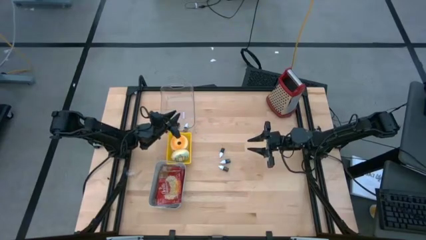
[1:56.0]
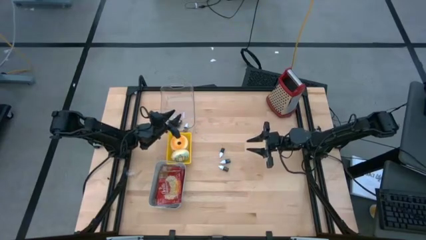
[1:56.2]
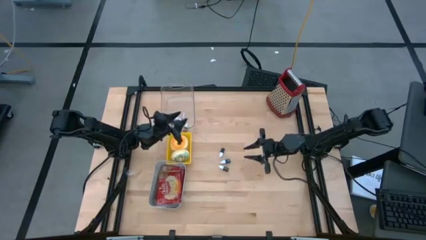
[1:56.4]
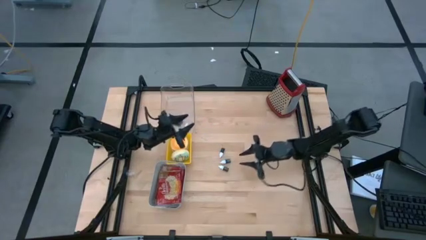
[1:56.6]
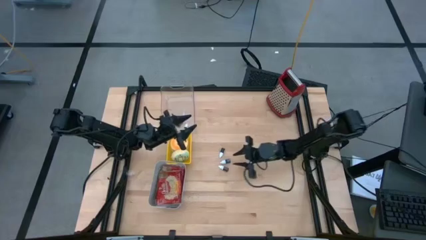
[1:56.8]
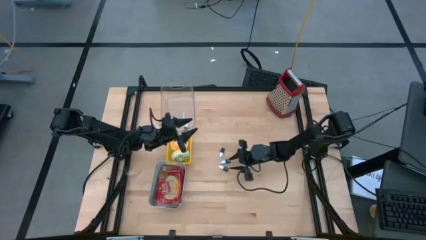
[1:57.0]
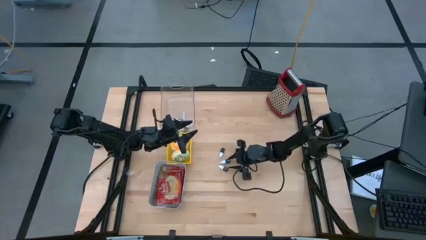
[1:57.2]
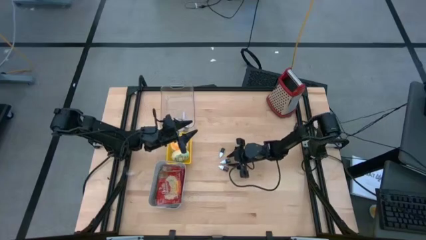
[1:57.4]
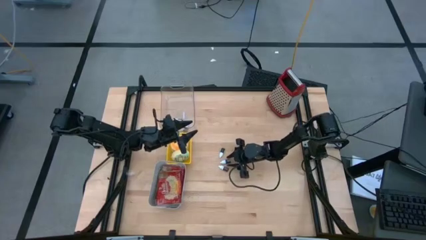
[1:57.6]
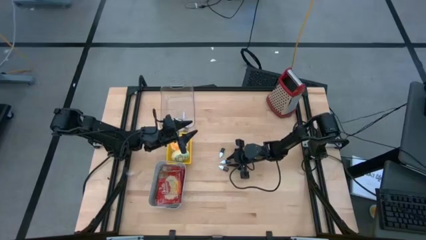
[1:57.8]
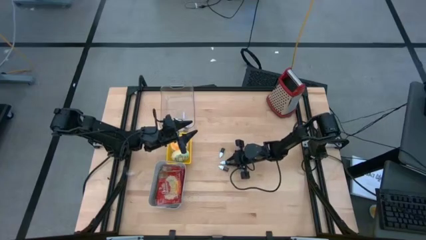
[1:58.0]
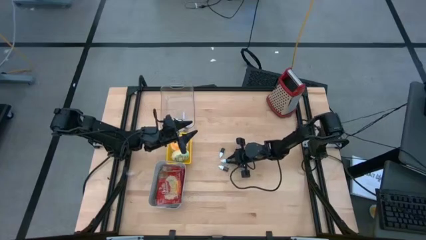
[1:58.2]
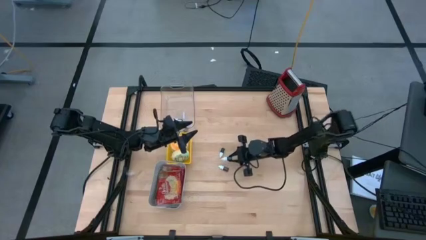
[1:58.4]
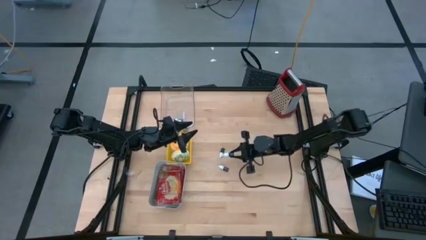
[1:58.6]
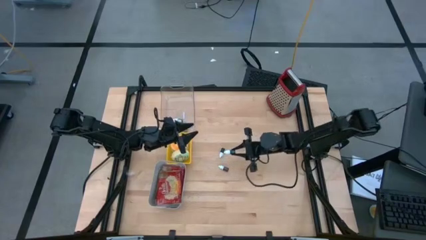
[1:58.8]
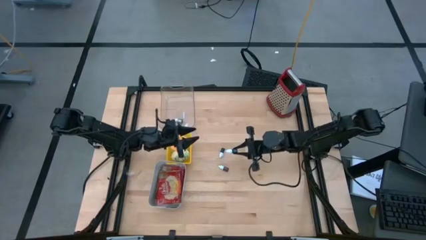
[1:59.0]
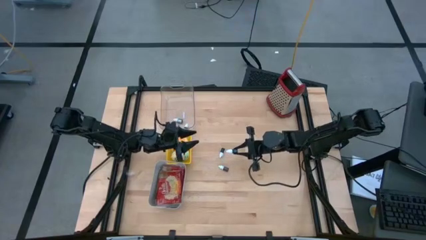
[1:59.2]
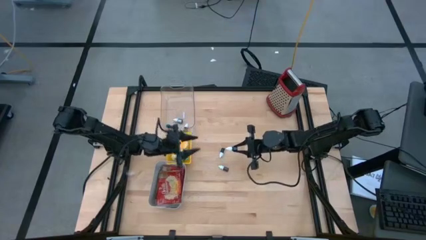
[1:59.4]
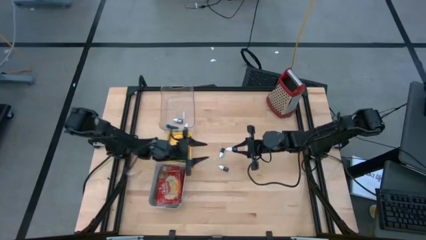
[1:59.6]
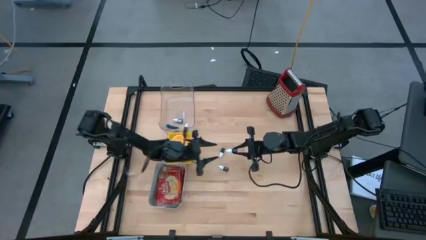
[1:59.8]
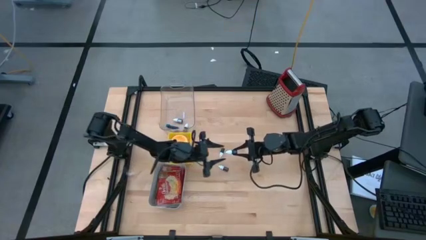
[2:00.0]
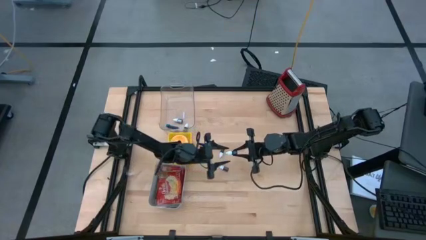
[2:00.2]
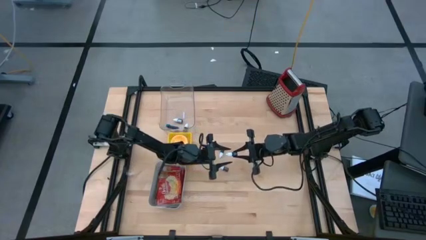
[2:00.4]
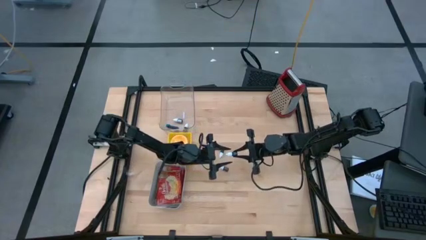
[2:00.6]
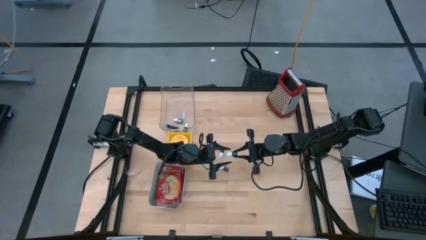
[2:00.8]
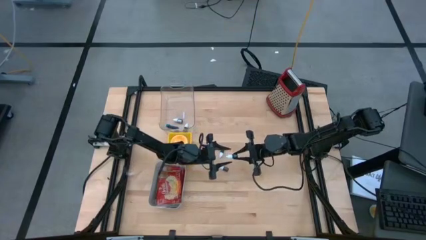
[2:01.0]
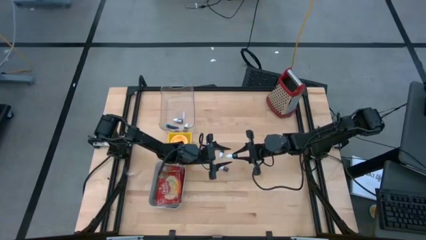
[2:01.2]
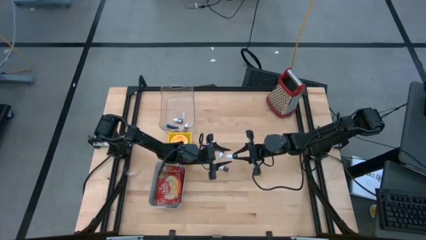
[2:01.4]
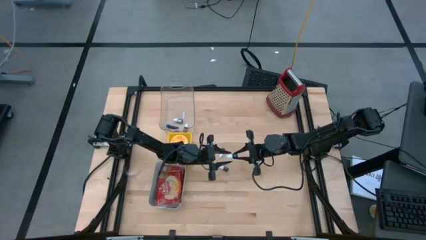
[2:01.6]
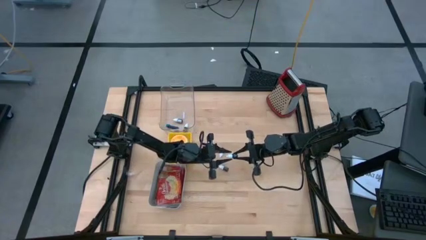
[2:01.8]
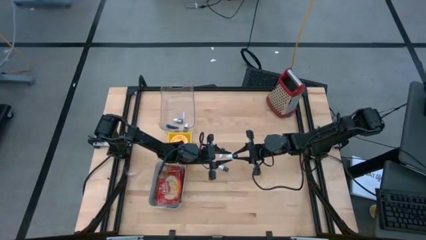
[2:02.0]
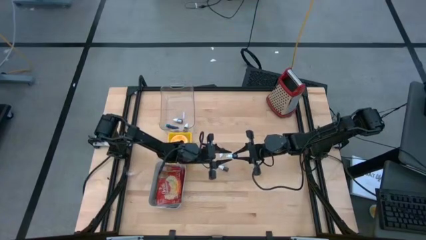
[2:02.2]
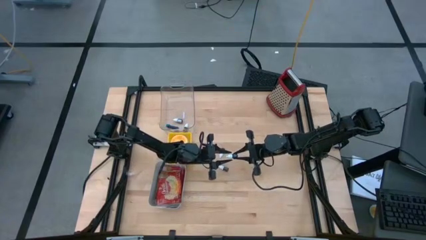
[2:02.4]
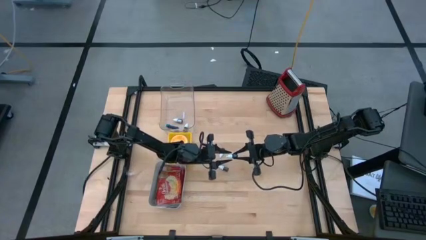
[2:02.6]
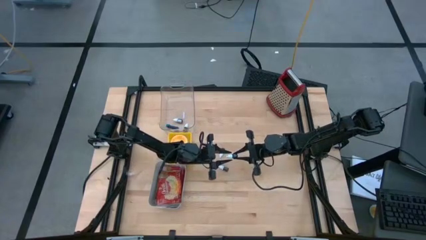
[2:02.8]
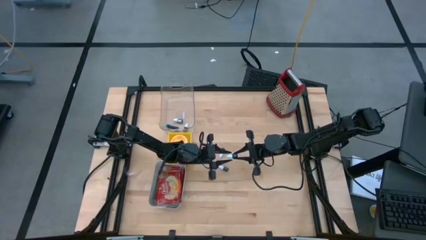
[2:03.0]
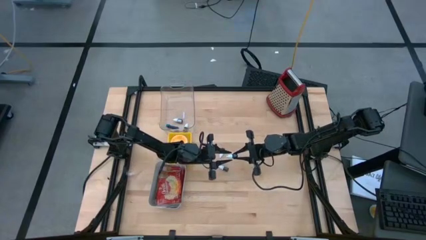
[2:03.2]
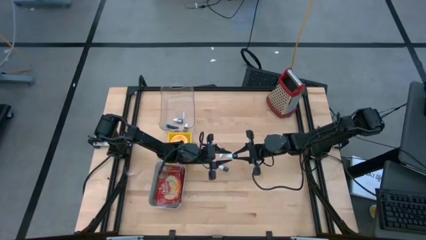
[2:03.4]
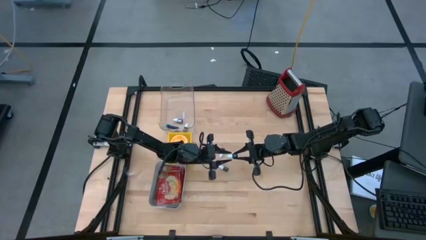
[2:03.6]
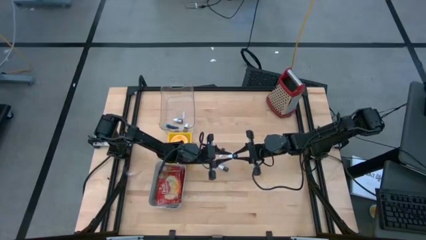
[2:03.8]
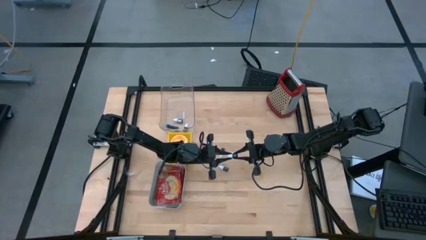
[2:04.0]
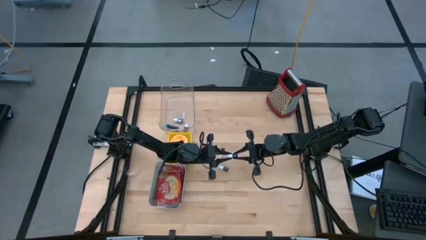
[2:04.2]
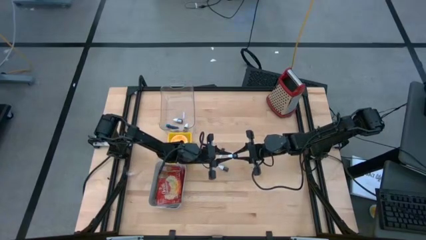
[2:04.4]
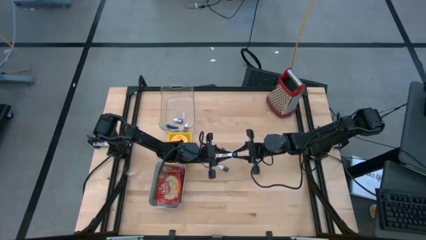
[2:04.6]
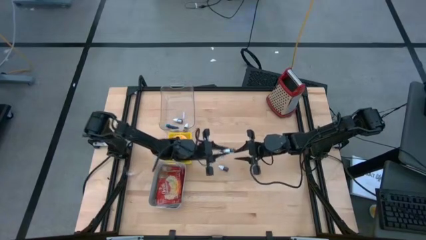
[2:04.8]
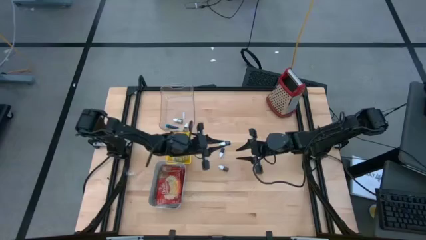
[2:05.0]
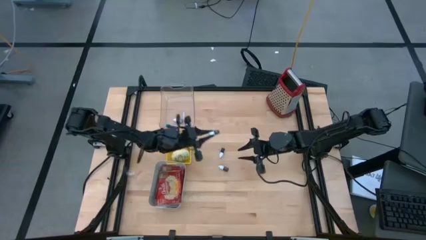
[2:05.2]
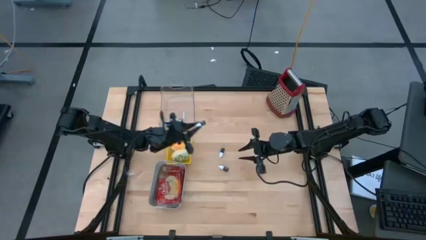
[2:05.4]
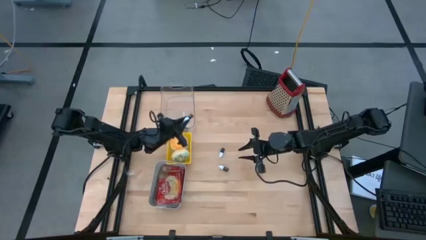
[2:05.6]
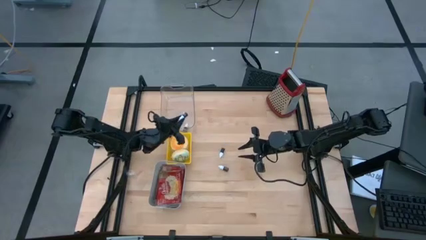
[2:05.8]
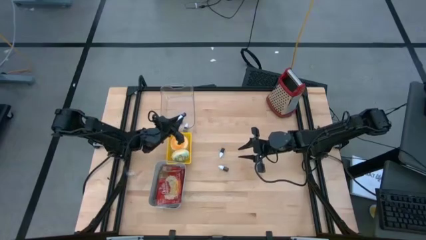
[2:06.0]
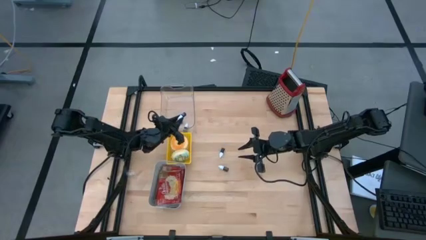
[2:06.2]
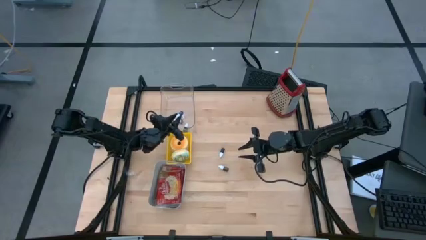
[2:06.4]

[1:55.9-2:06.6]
Task: Pick & Place Food Item
Put the blue food coloring bottle into the transparent bin

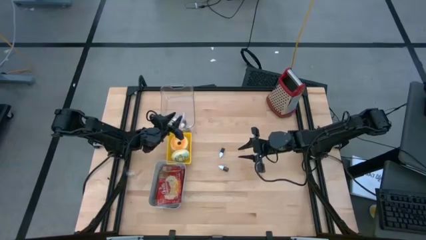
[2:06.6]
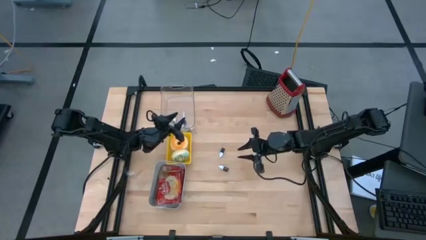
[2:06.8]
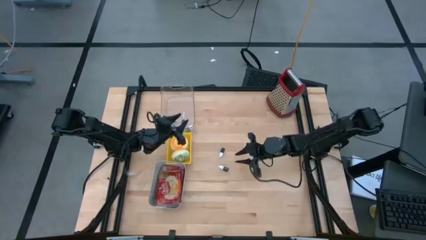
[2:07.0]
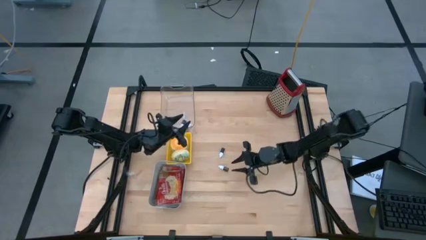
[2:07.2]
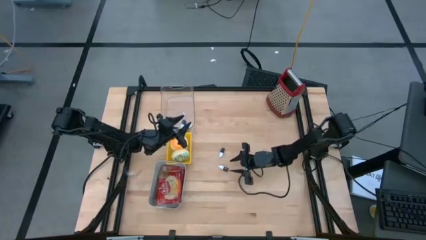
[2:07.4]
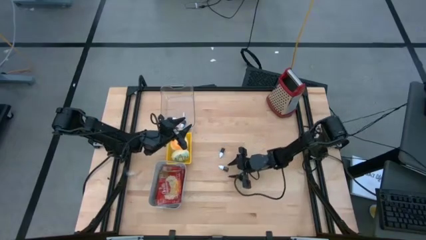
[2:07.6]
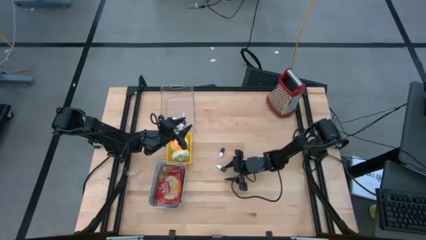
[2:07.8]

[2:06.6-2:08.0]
Put the brown food coloring bottle into the transparent bin

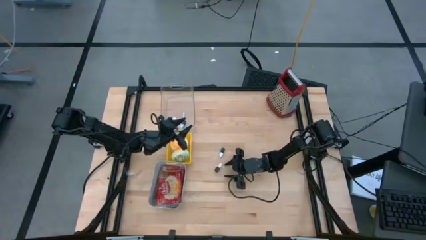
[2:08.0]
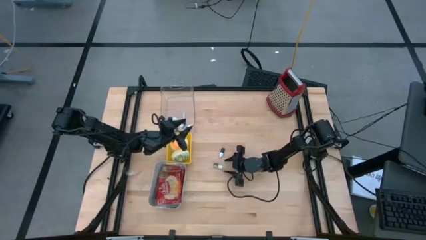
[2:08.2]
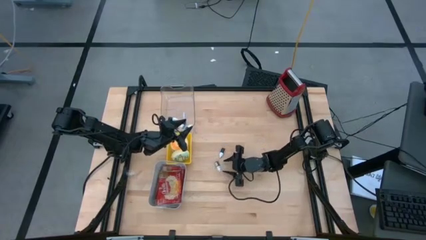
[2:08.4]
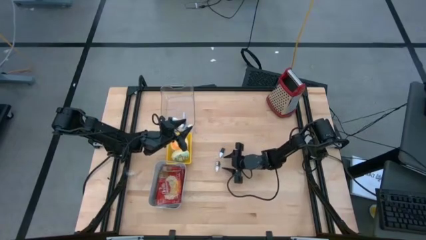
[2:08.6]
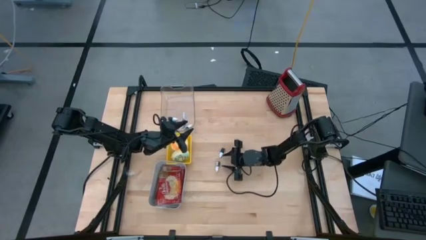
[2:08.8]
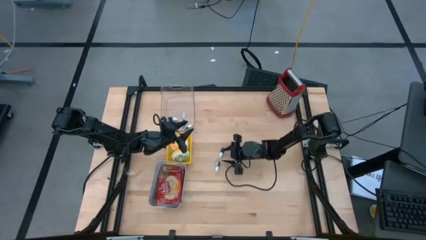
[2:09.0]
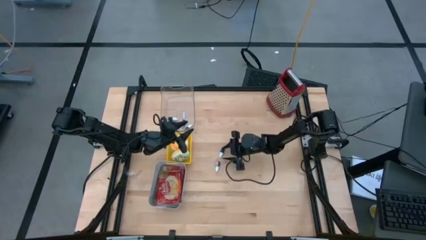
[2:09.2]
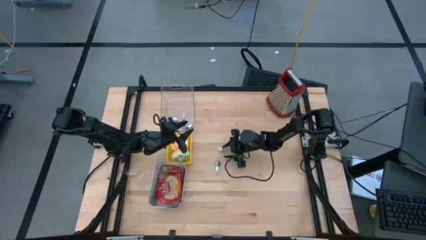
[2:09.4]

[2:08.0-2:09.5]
Put the green food coloring bottle into the transparent bin
